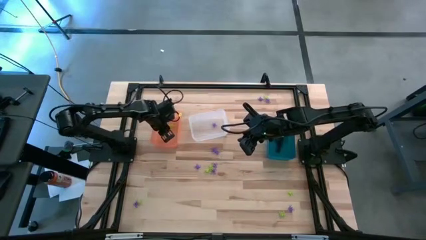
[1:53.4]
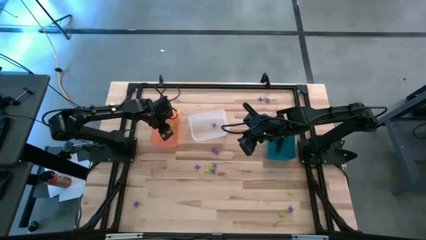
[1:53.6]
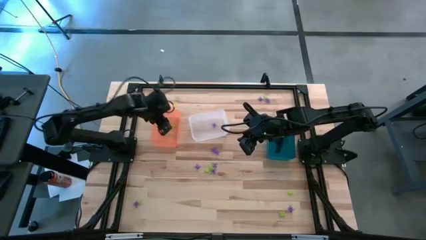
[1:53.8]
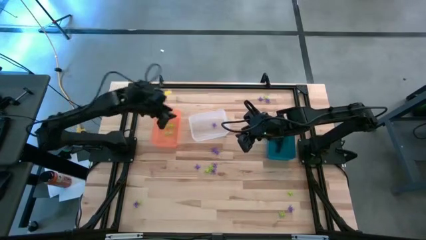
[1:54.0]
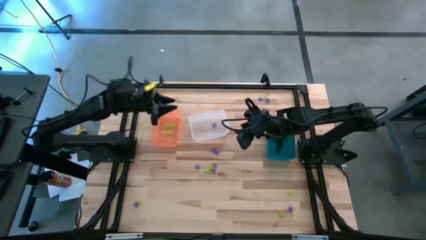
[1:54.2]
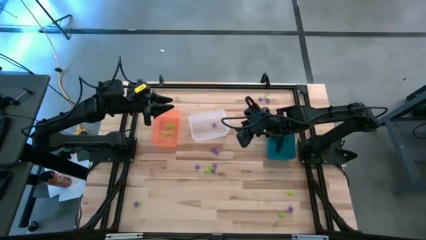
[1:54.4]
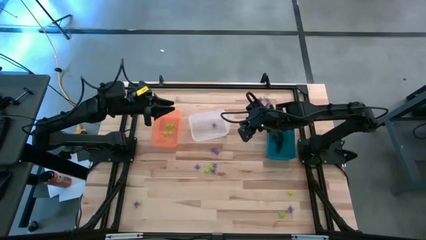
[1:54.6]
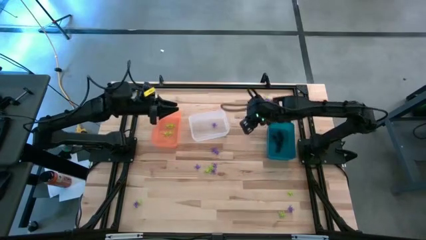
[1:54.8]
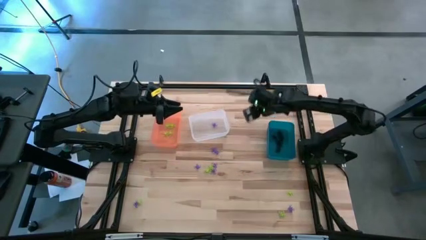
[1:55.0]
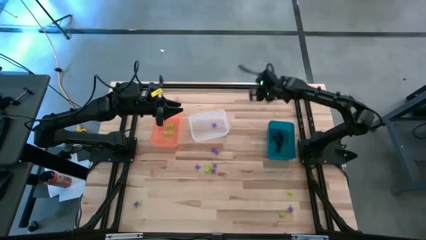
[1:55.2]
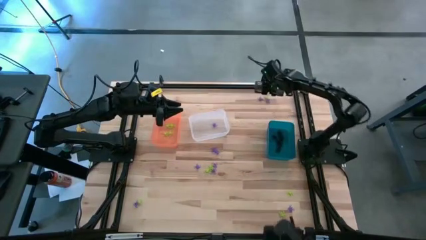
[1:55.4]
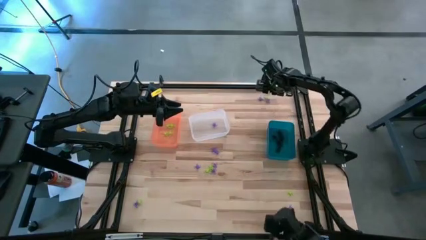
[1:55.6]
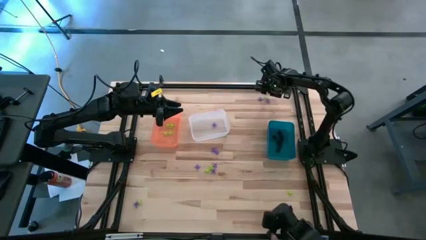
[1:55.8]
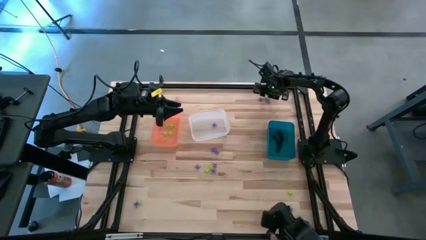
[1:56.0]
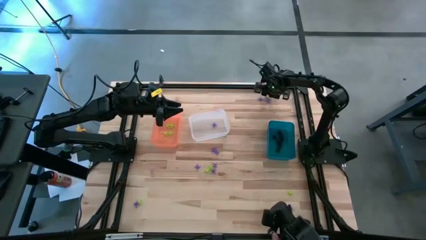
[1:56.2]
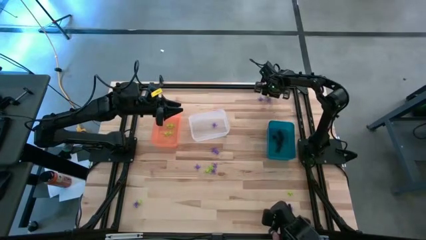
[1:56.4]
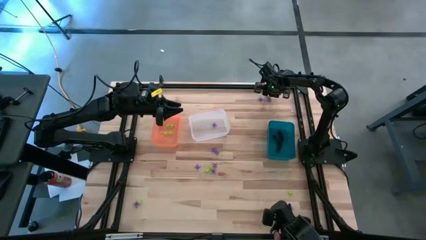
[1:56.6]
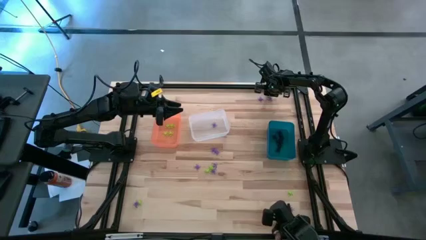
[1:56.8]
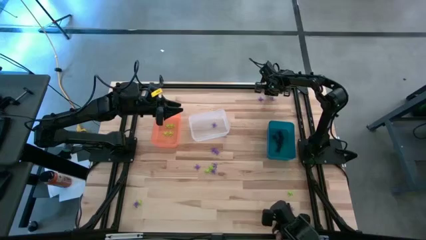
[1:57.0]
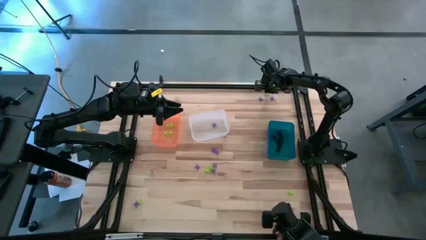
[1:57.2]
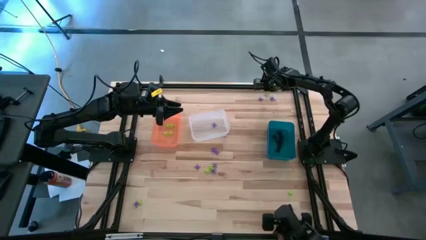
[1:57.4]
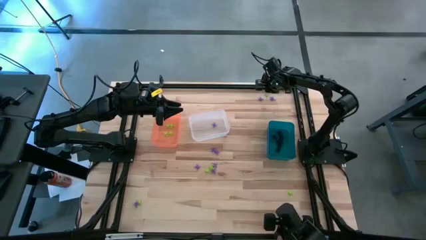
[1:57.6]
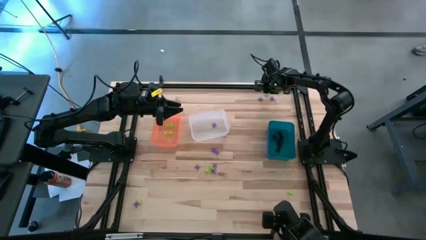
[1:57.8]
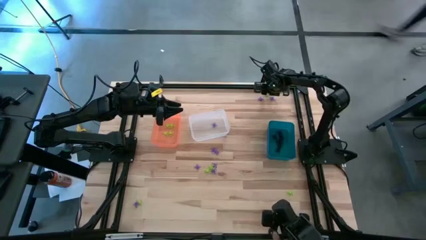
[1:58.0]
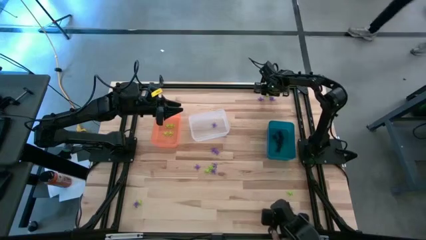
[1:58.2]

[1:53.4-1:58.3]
Task: Sort Halloween decoration
Put the green spider toy into the orange bin

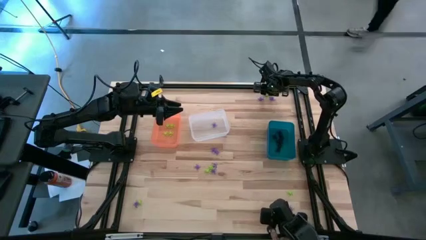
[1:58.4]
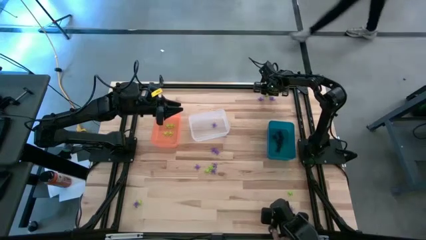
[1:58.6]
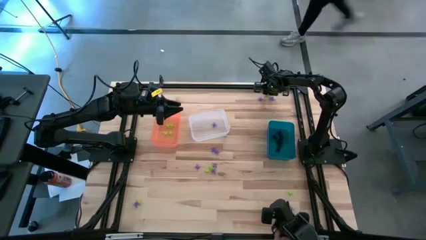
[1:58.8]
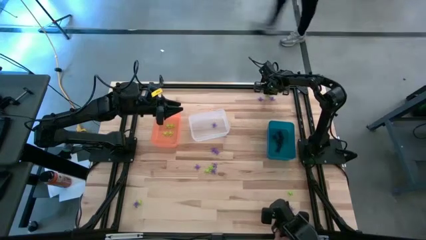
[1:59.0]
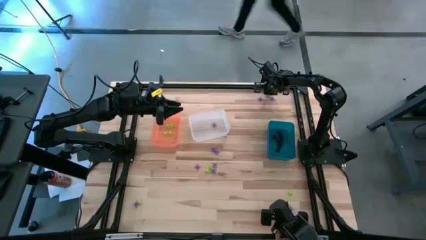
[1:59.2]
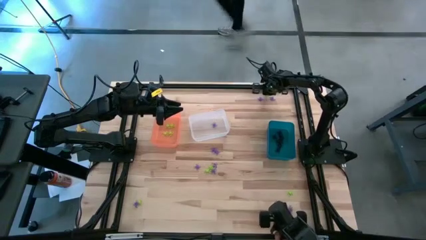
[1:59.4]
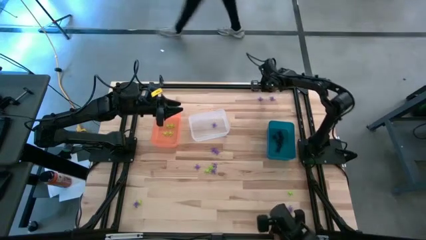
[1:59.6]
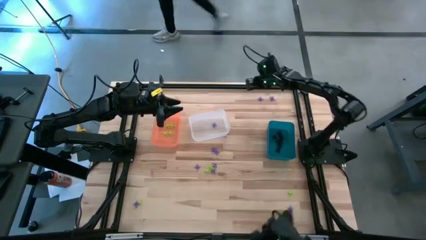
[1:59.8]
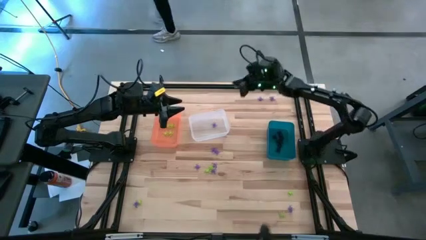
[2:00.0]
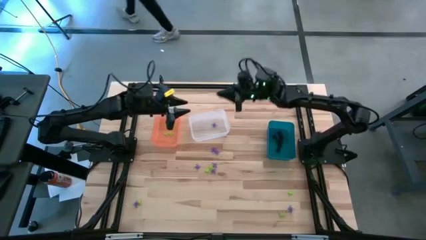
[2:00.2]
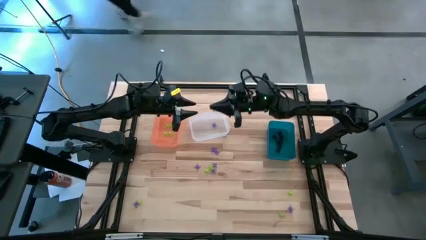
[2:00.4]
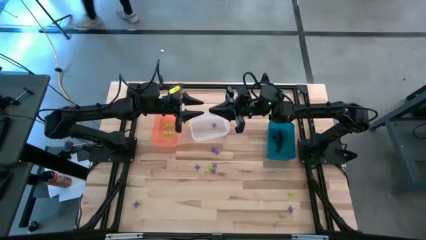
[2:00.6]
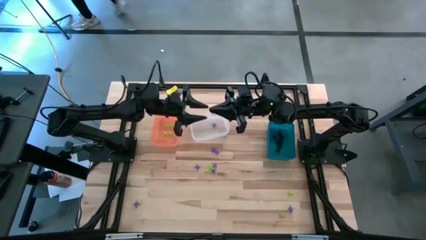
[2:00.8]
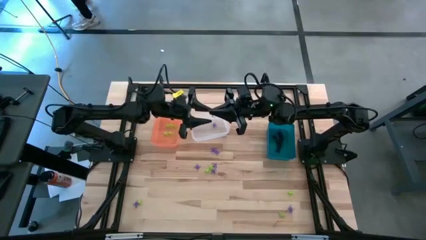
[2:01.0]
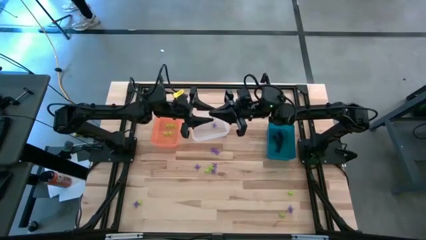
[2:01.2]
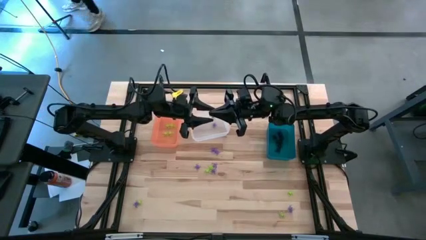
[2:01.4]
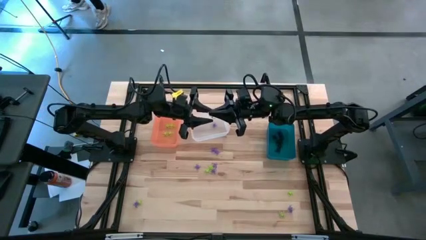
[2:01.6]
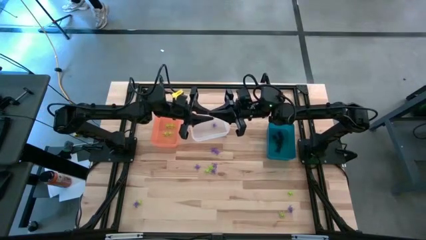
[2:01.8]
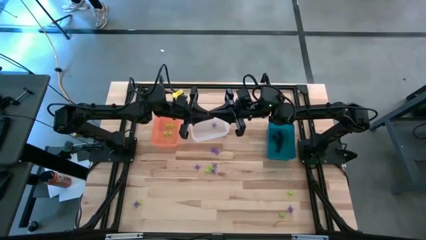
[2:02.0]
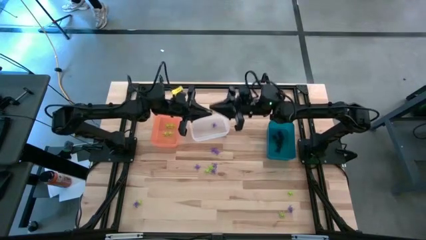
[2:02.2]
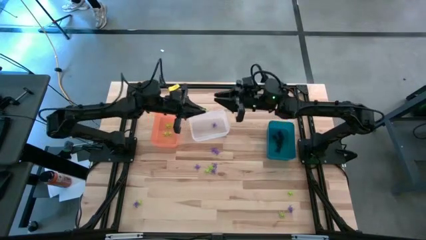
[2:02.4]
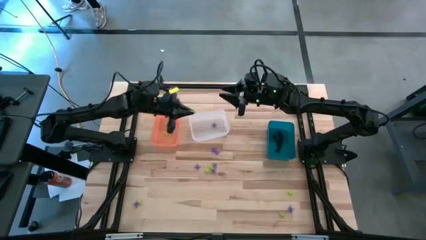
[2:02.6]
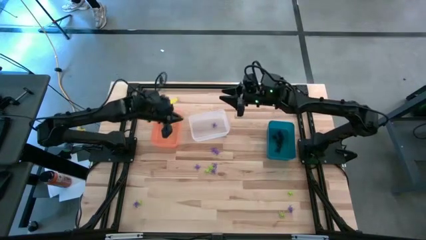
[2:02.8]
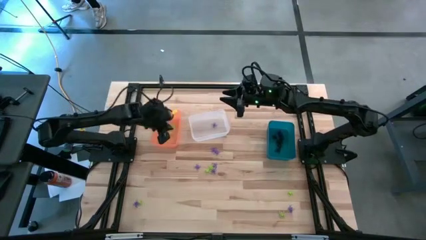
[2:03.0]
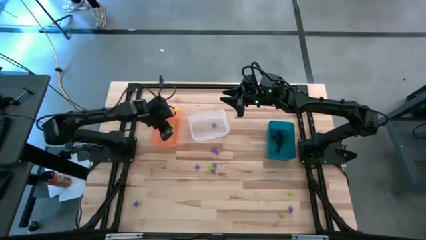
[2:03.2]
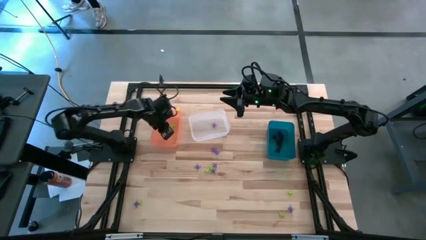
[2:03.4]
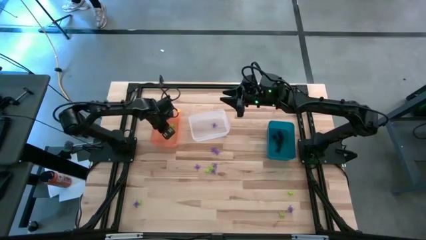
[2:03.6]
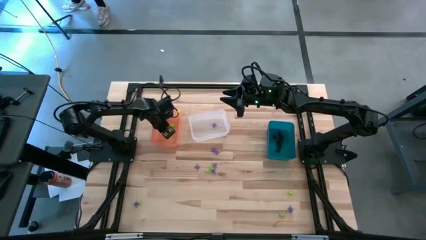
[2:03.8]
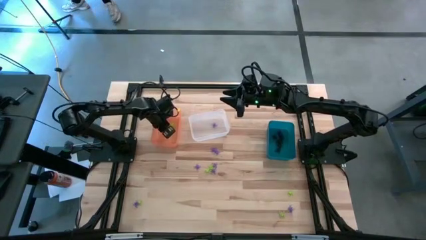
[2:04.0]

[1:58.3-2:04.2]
Put the green spider toy into the orange bin

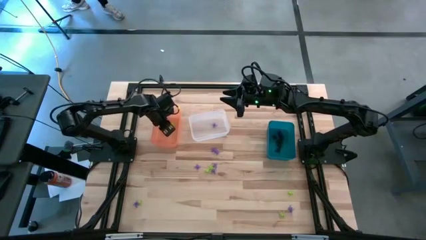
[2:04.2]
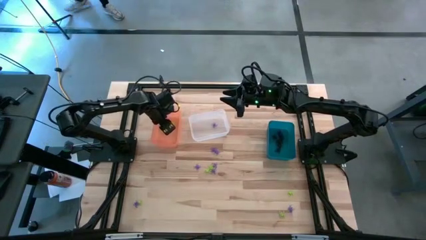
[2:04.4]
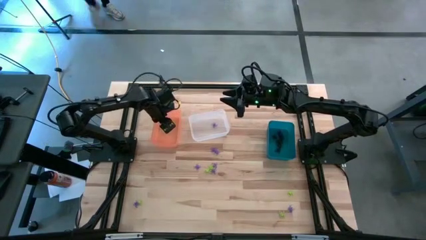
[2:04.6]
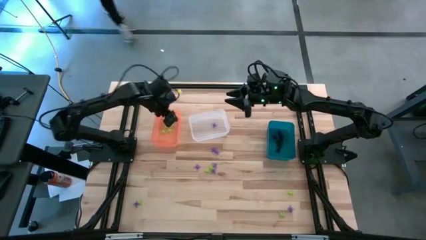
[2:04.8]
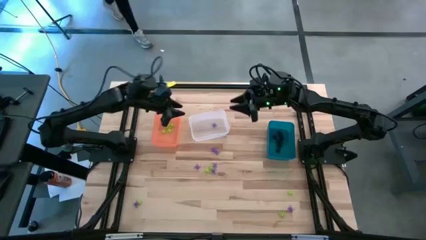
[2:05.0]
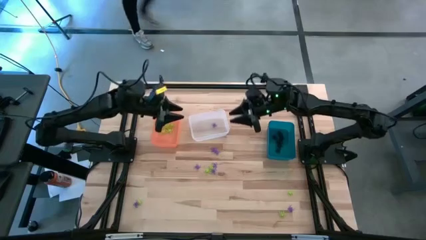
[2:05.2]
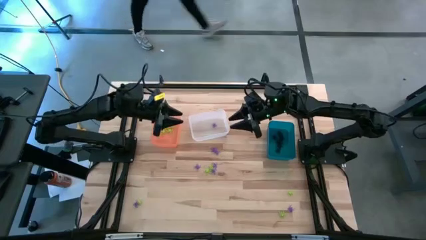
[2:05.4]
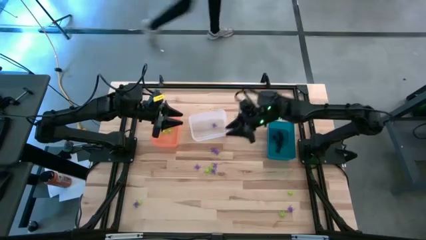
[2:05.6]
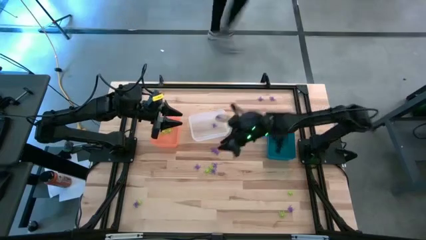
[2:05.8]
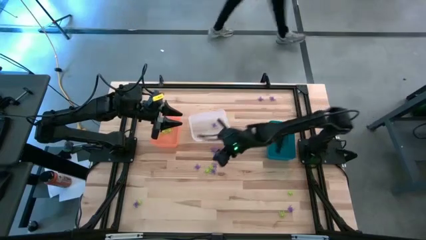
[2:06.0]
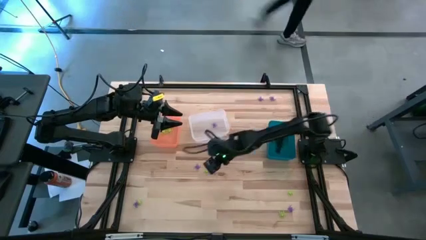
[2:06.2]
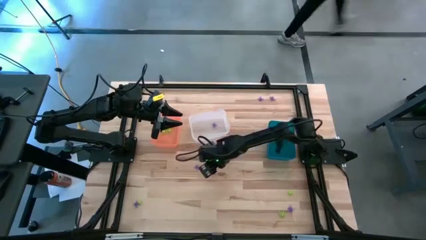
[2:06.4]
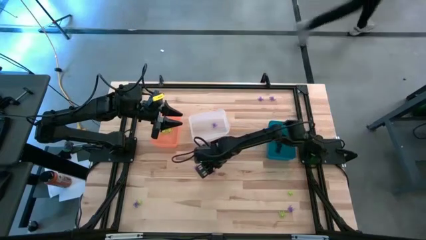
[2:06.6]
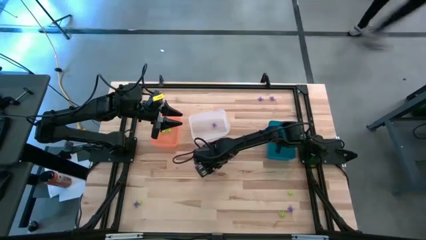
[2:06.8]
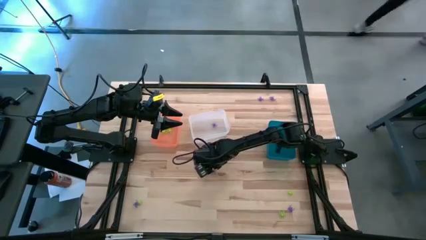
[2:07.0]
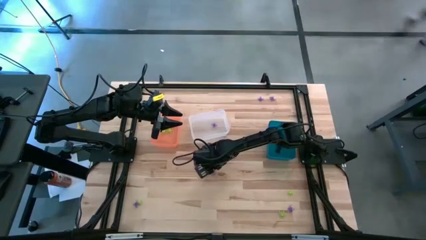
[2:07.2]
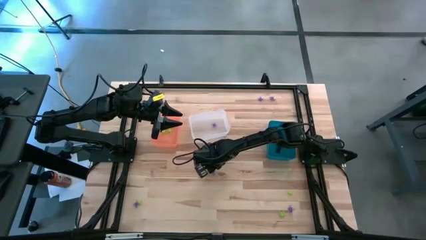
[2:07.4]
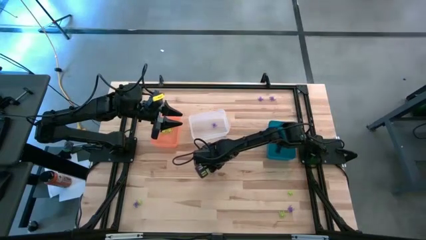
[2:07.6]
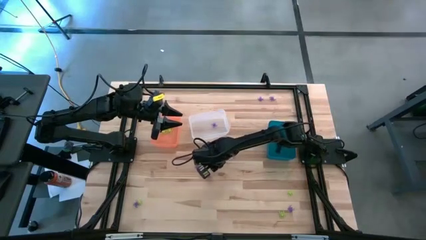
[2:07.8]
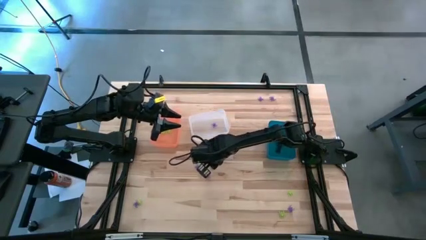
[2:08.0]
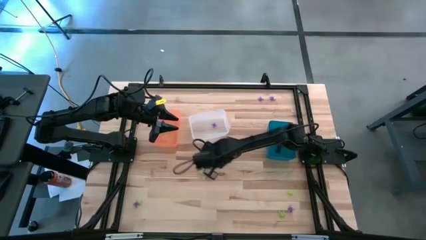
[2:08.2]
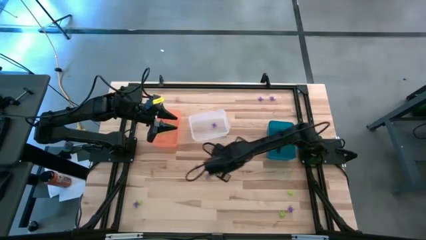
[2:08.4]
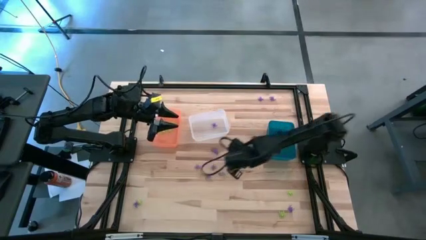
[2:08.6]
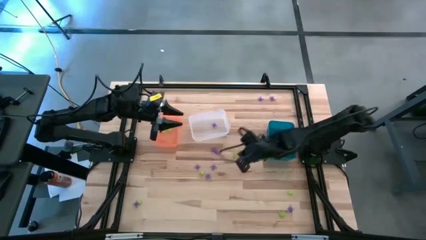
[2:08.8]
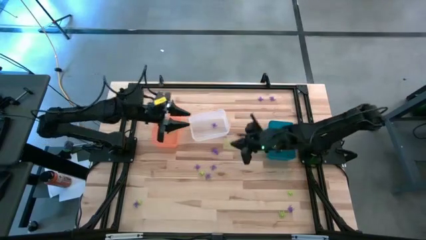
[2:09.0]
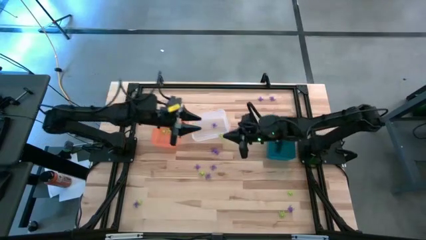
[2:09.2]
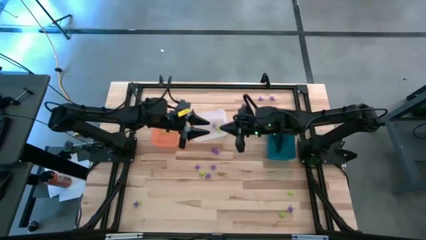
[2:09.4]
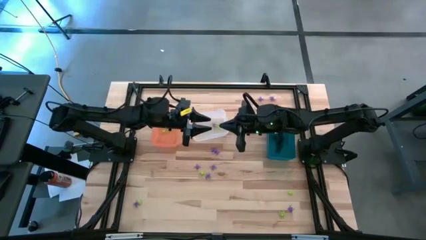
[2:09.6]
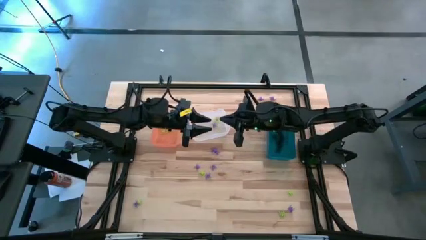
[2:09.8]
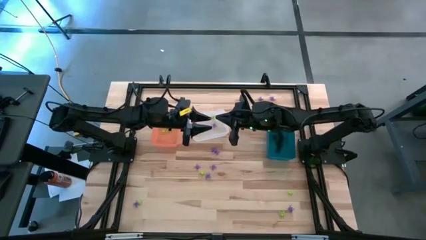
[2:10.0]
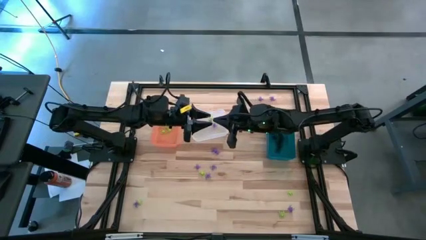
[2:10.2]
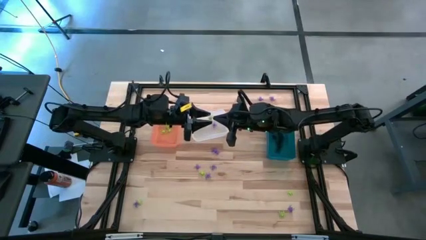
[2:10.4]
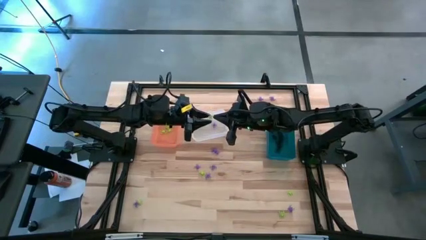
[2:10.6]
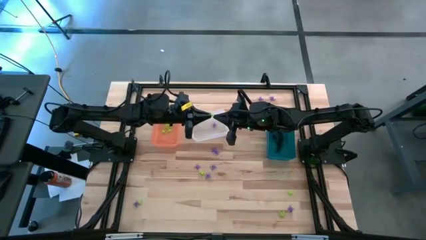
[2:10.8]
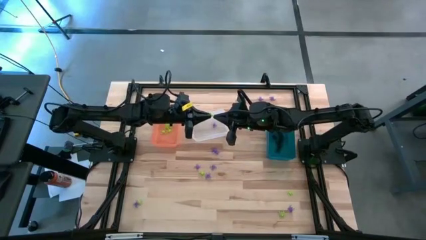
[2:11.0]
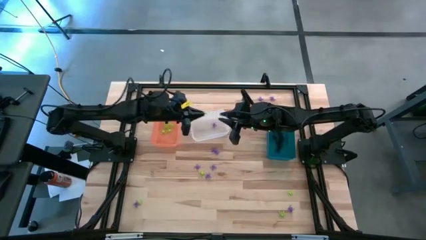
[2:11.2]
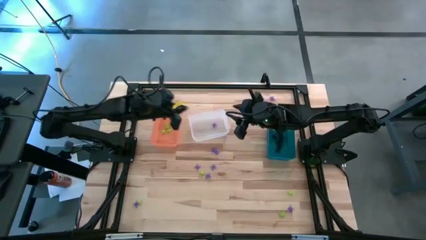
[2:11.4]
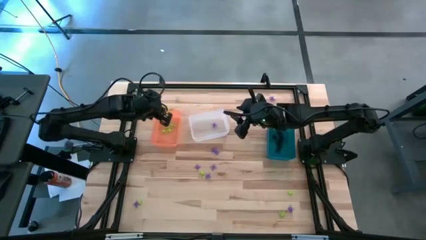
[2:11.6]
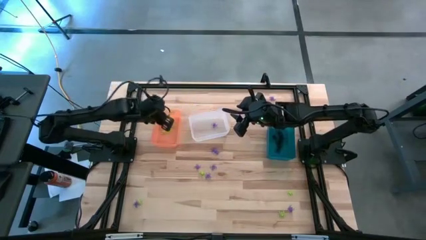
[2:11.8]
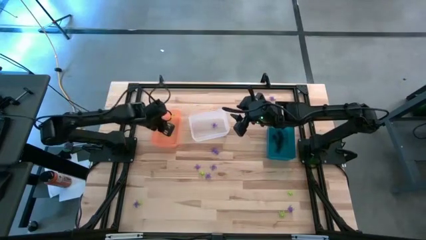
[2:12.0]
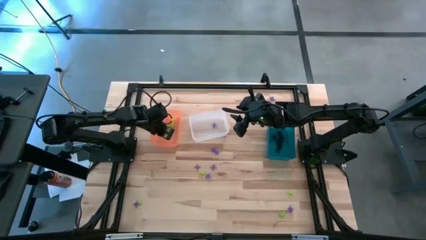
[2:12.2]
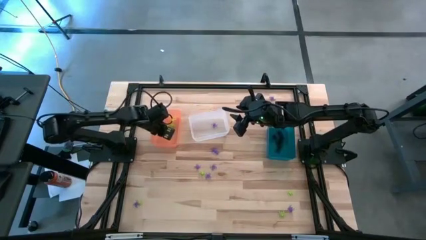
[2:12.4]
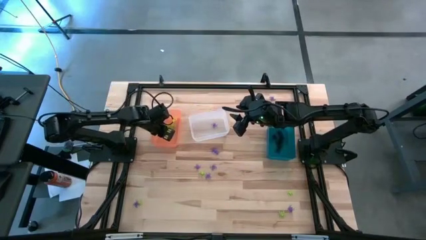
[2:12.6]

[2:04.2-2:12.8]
Put the green spider toy into the orange bin
